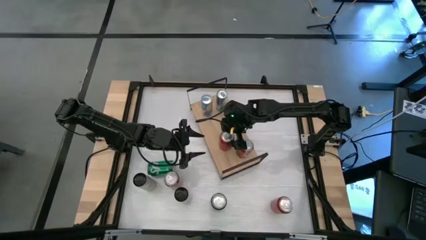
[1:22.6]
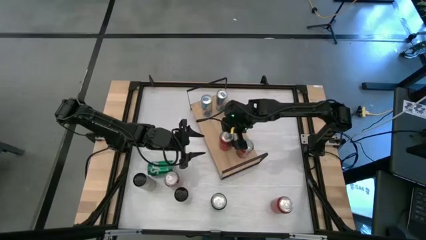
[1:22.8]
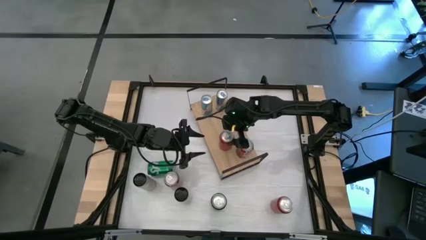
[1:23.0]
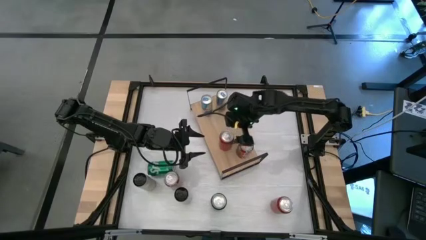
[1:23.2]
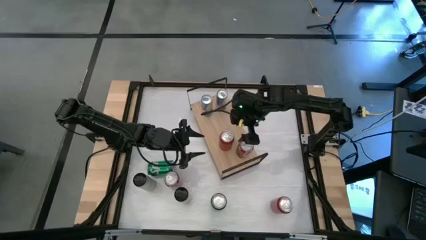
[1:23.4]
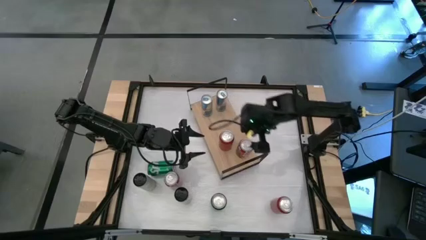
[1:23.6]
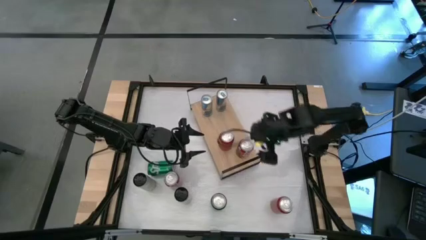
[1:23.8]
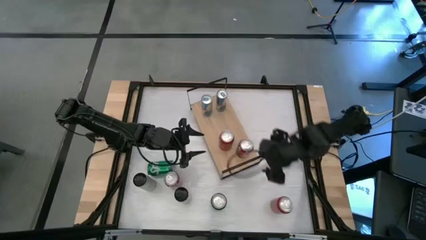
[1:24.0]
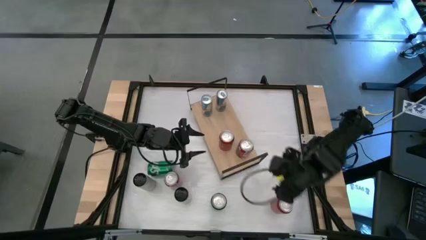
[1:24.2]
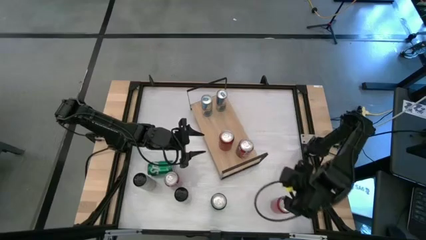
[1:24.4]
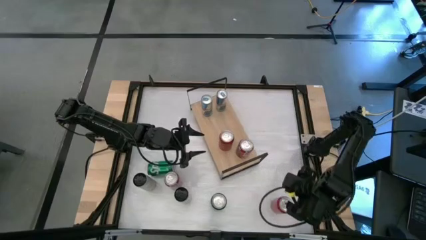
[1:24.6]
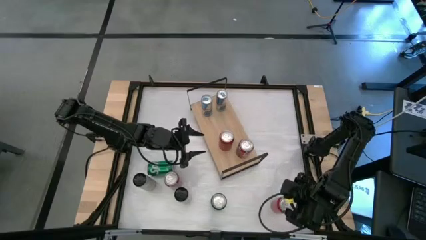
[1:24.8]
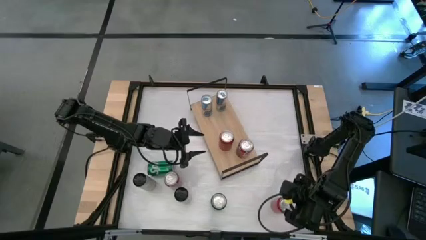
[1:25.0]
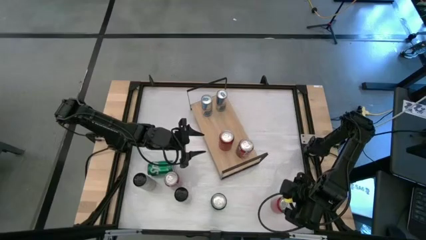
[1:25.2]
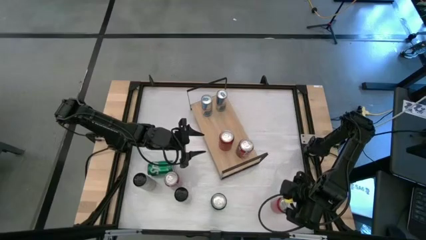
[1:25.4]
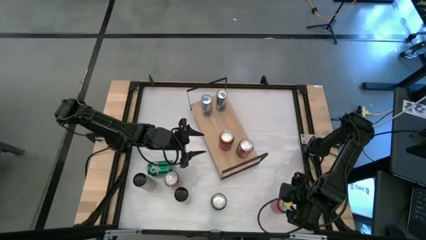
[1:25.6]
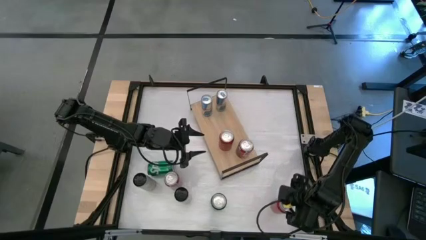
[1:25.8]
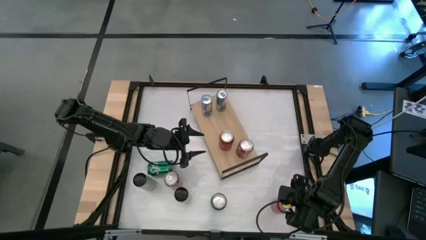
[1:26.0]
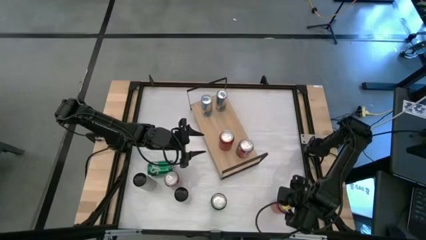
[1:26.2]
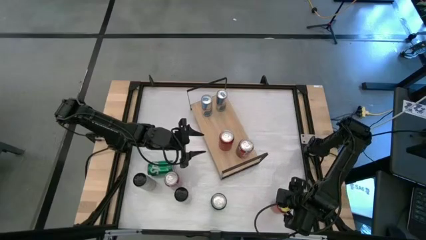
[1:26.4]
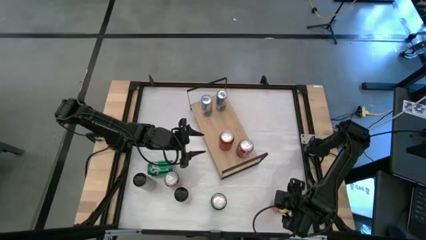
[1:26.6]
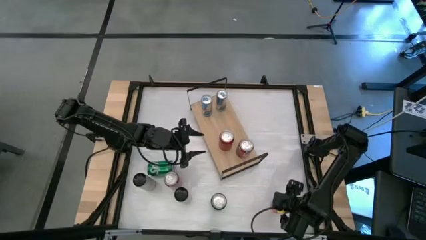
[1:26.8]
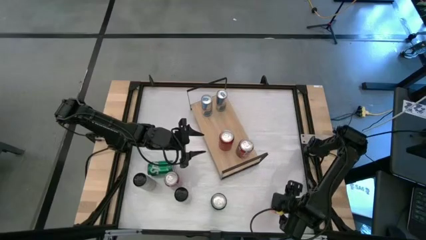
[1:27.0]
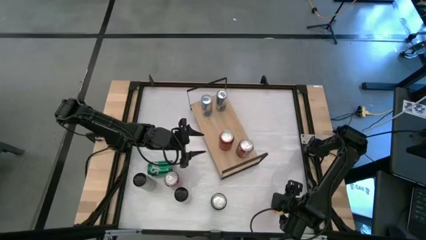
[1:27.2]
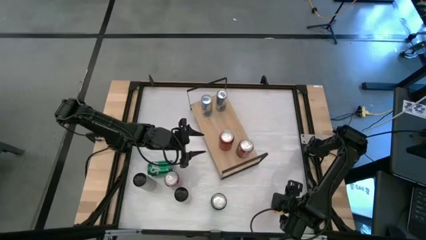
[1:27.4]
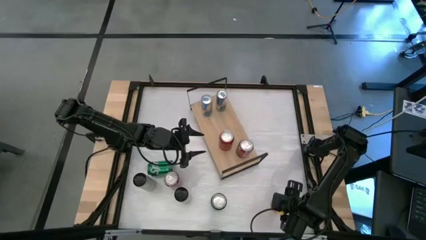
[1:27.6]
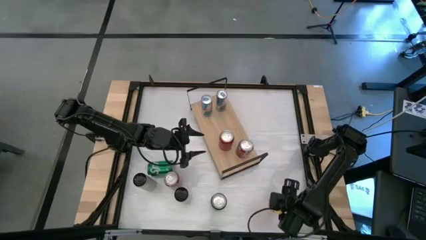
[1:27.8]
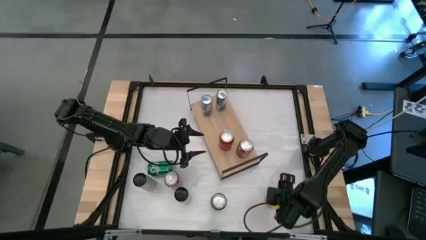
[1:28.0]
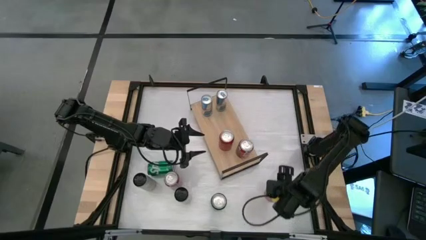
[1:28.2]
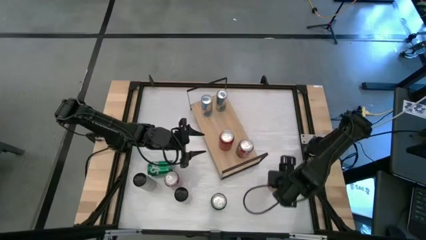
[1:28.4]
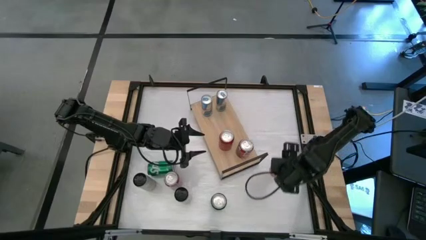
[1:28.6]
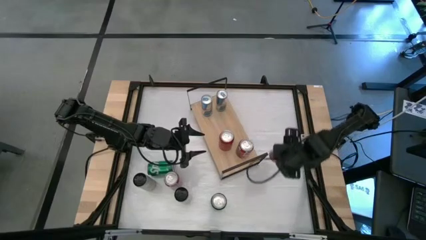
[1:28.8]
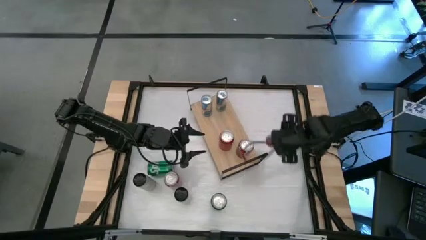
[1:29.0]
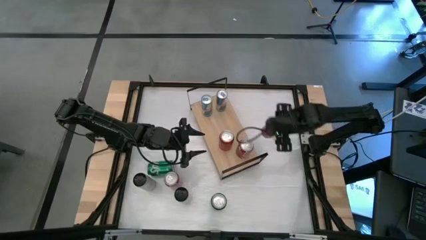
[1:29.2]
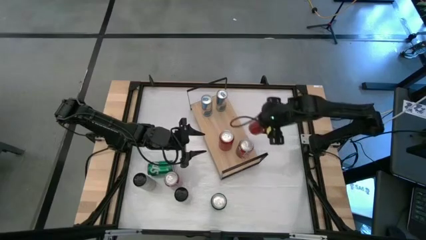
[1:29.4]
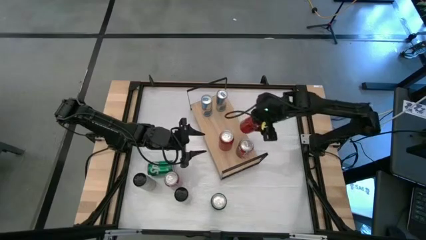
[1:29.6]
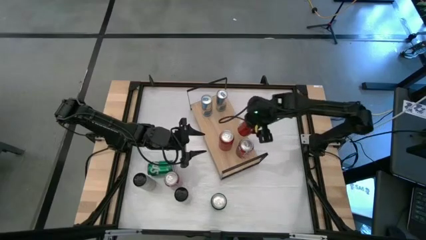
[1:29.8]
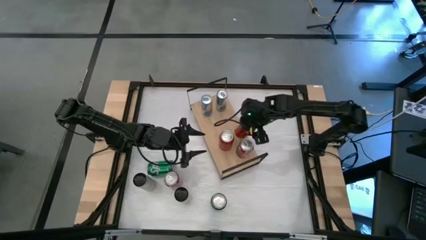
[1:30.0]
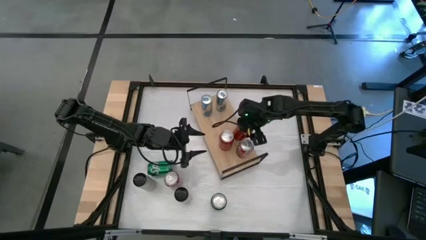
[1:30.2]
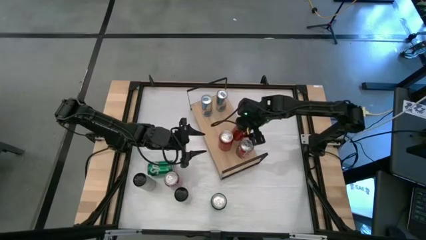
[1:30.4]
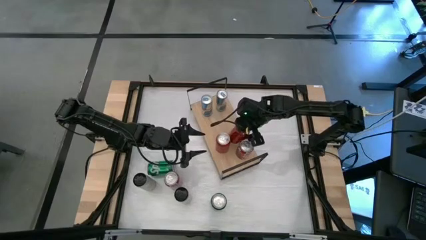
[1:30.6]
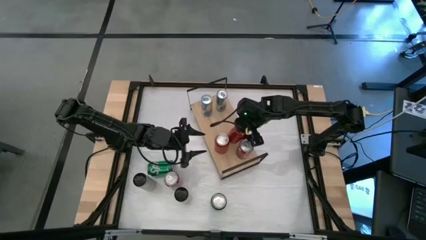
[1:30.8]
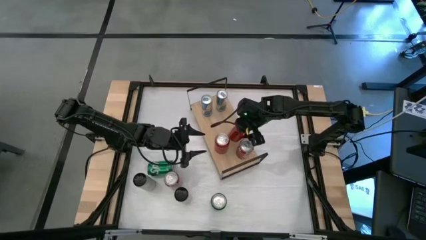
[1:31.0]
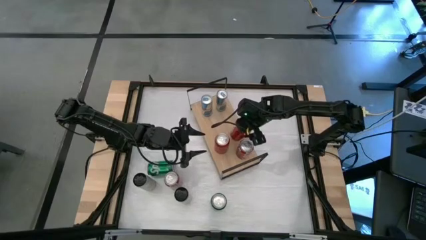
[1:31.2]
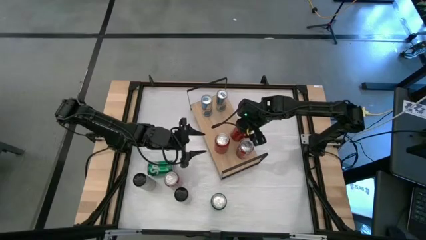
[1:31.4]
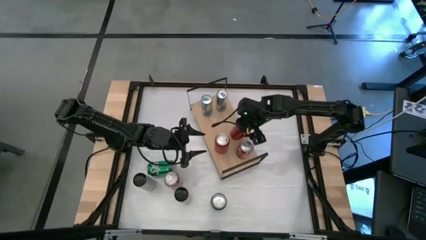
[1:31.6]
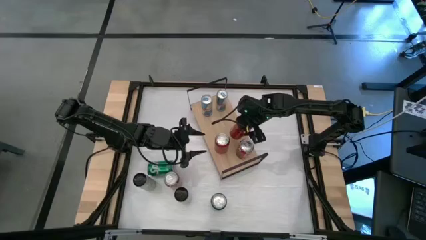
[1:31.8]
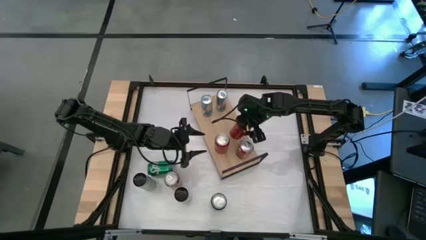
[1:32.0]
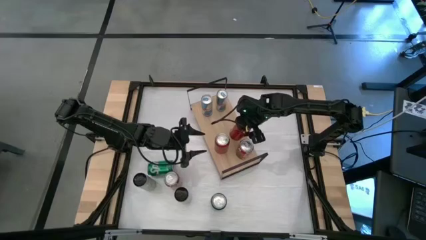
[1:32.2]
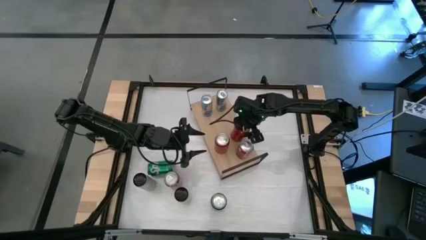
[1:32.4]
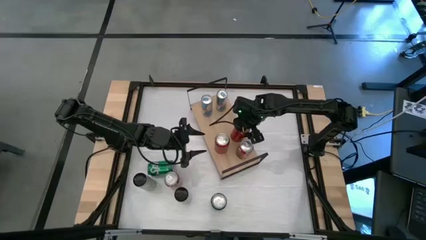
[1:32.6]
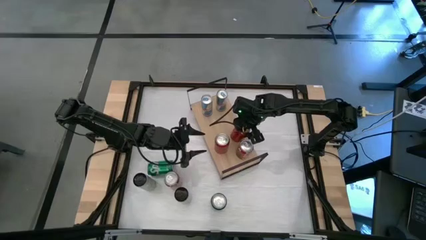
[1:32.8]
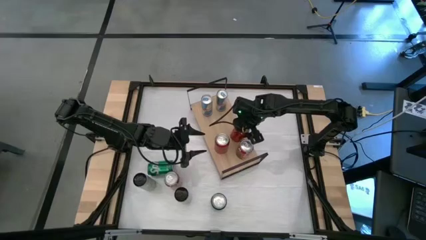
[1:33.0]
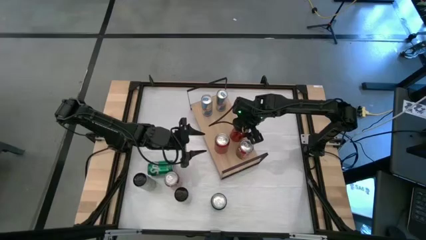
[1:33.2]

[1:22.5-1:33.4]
Task: Place canned beverage on shelf
Put the red and black soda can on the shelf aligned with the other red and black soda can

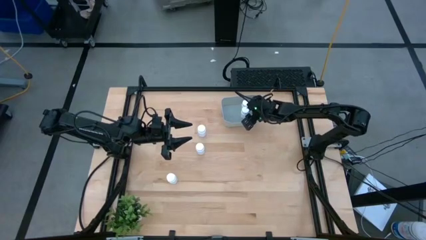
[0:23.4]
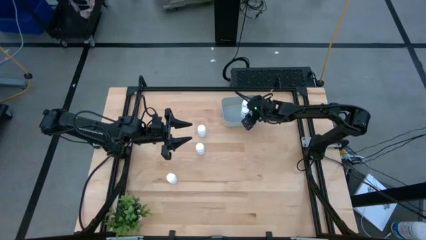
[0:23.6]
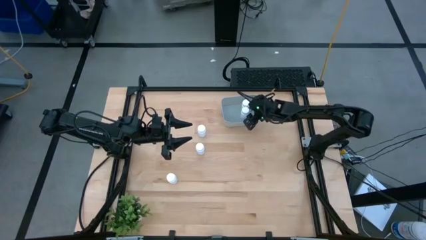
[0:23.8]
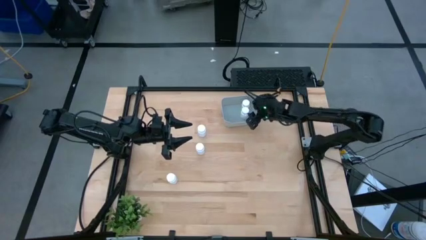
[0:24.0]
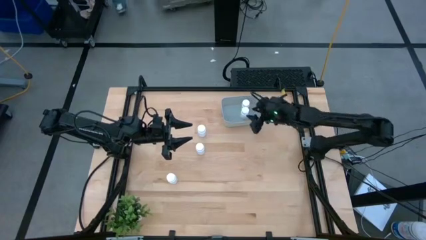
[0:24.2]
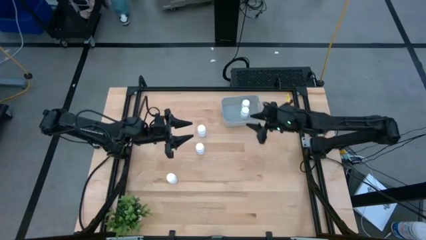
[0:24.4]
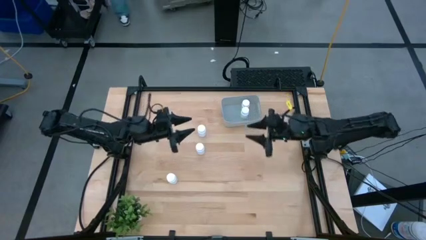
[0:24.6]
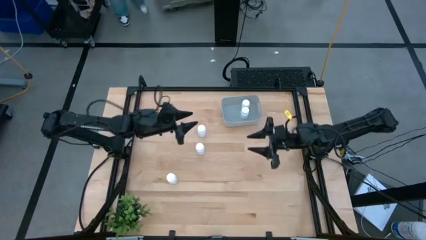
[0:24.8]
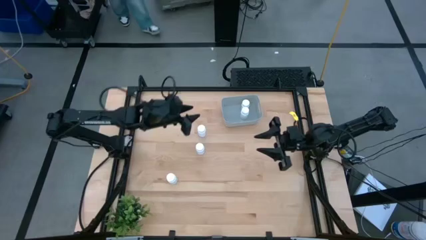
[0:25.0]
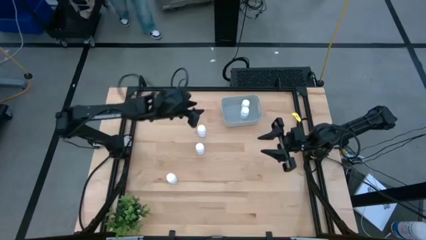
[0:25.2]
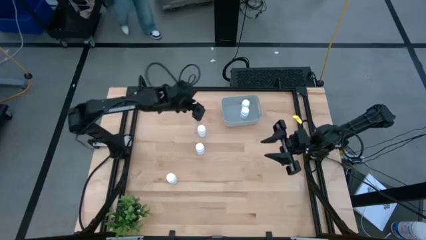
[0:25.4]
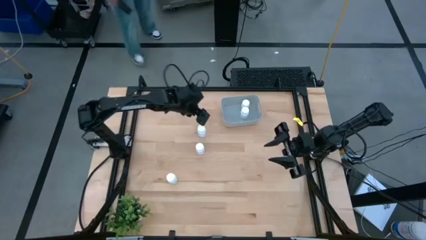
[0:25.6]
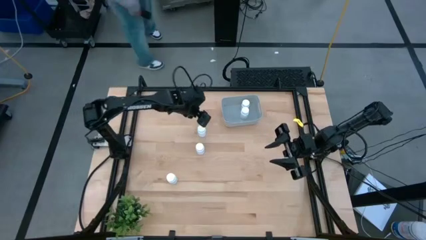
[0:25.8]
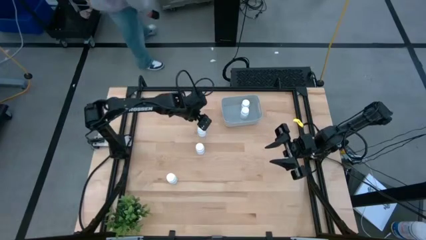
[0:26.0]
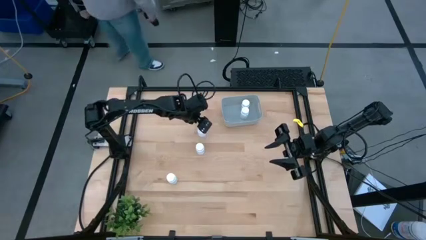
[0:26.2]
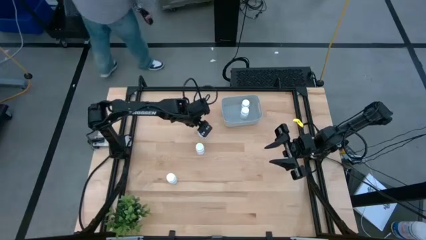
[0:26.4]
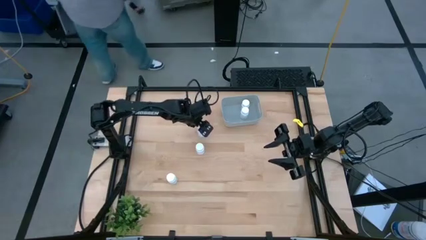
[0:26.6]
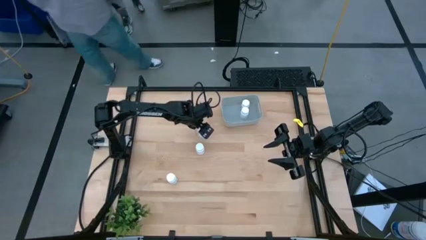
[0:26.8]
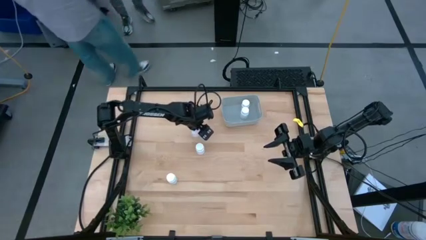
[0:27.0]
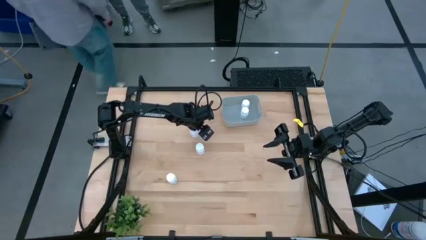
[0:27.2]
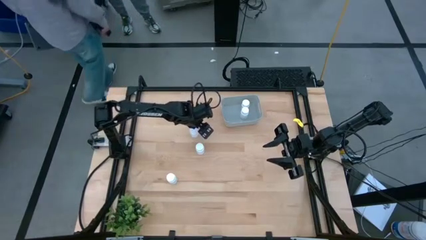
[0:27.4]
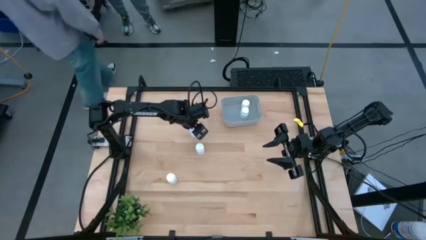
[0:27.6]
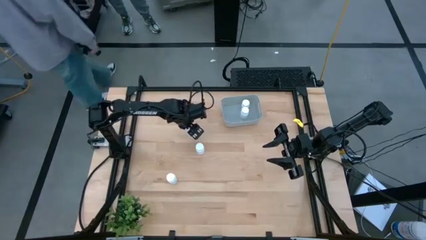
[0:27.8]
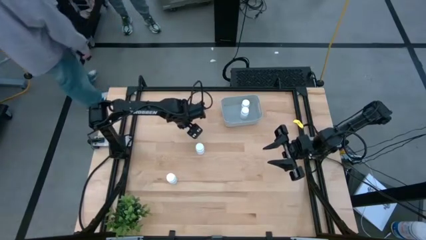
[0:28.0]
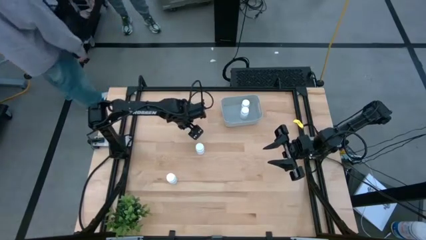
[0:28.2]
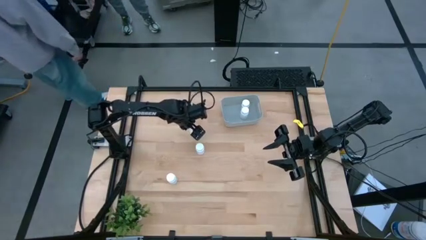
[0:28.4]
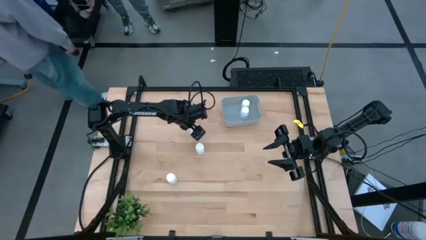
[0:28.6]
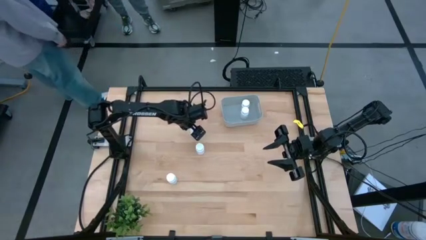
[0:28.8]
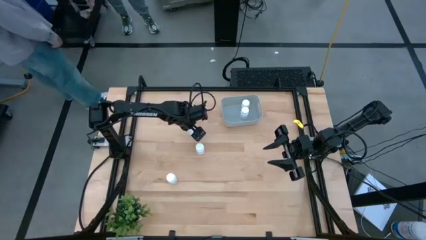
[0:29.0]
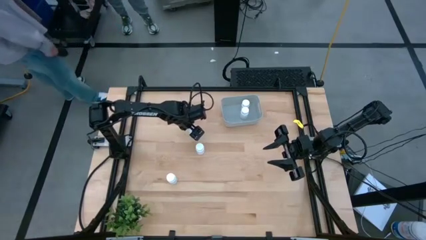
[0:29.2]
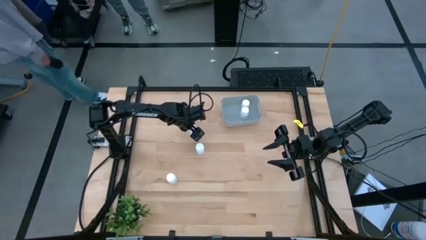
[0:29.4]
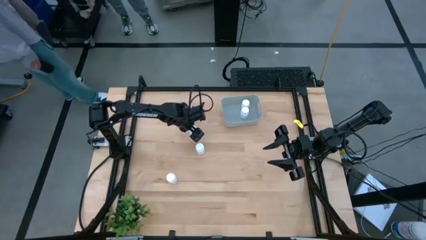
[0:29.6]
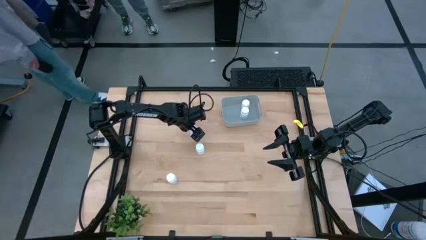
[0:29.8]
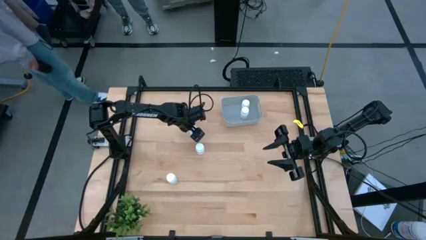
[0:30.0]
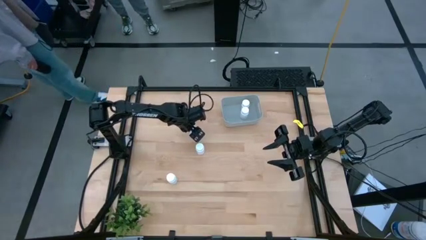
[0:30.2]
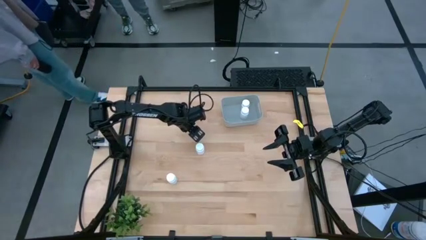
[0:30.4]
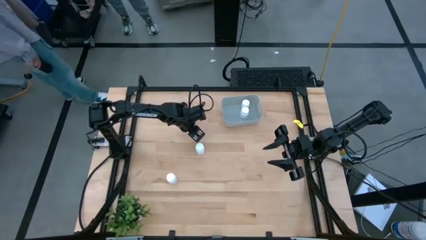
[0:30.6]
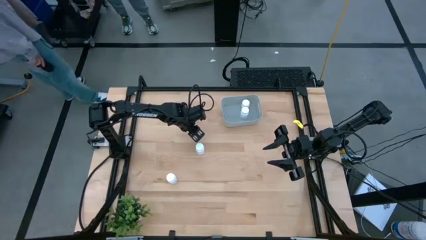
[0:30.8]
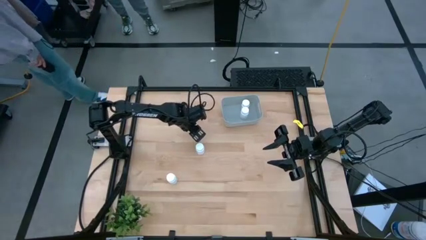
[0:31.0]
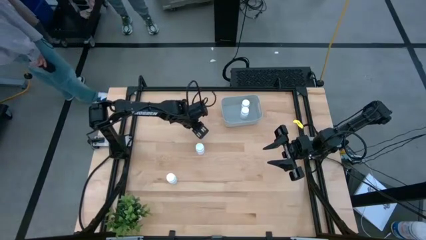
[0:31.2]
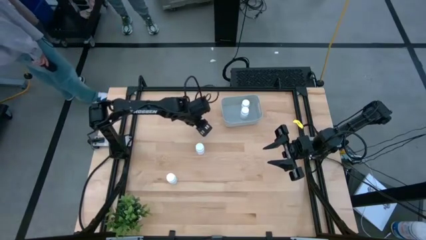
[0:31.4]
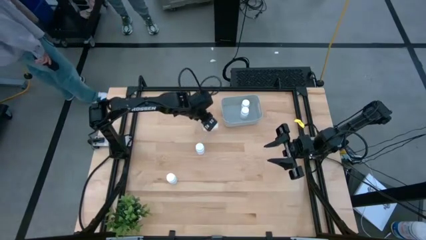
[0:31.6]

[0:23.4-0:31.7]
Task: Pick and place pill bottles into a basket
Put the white medicine bottle into the gray bin
